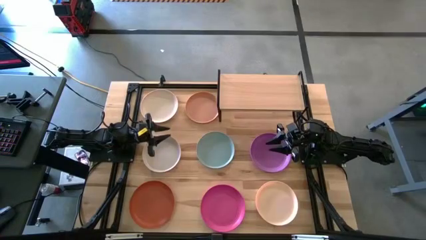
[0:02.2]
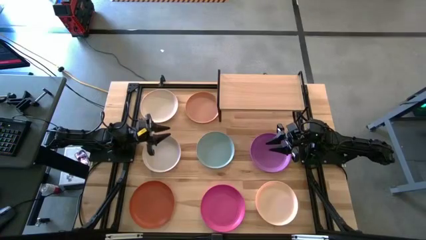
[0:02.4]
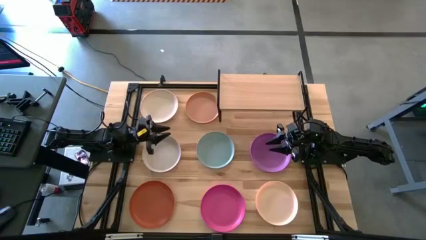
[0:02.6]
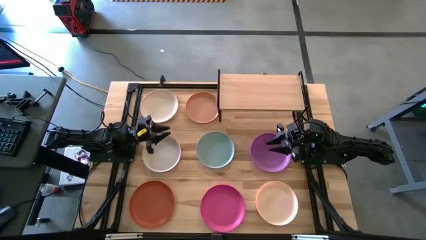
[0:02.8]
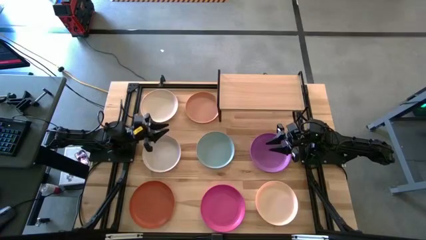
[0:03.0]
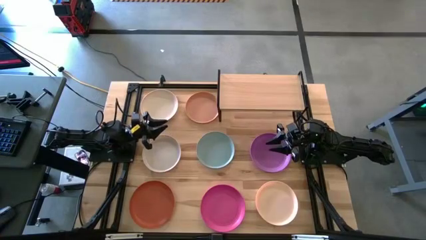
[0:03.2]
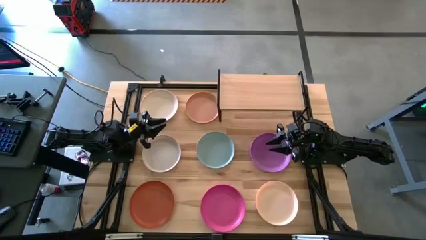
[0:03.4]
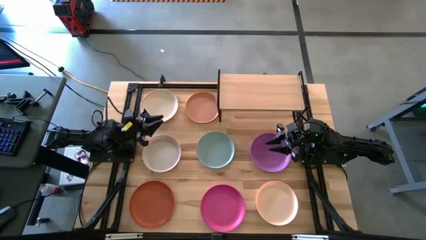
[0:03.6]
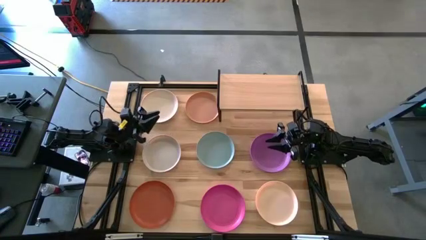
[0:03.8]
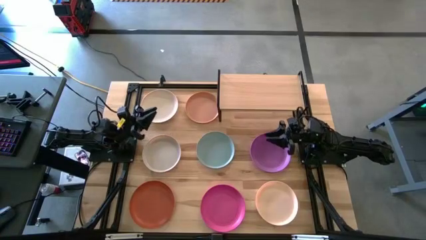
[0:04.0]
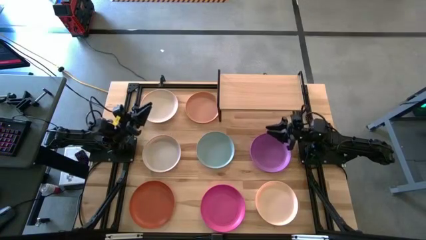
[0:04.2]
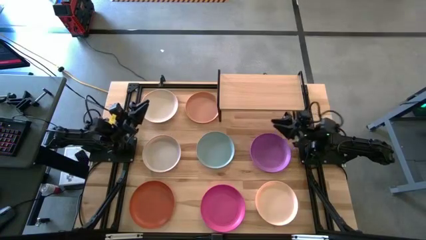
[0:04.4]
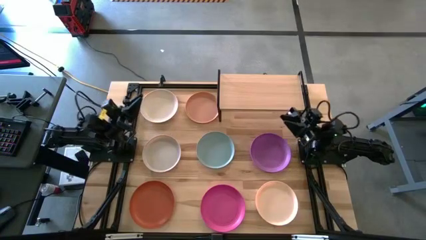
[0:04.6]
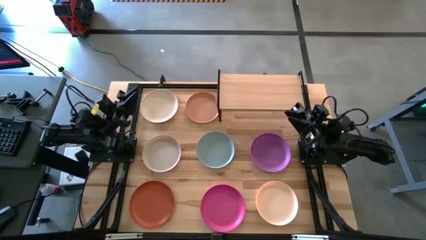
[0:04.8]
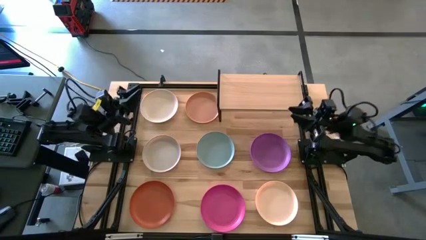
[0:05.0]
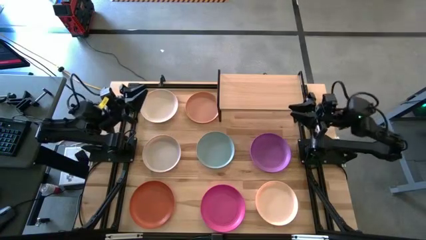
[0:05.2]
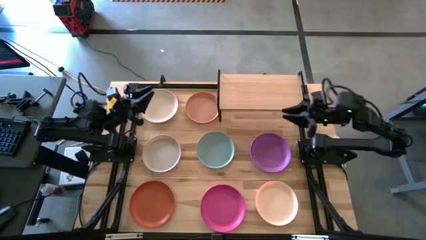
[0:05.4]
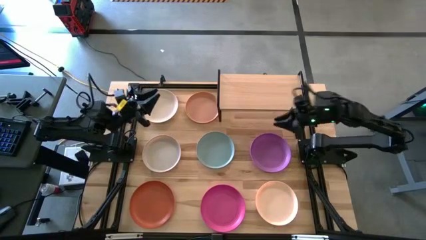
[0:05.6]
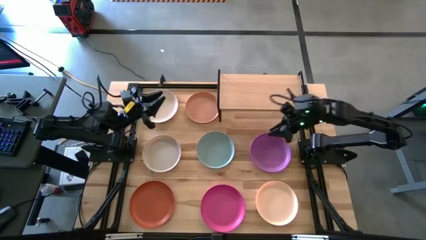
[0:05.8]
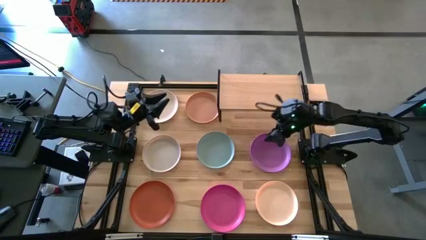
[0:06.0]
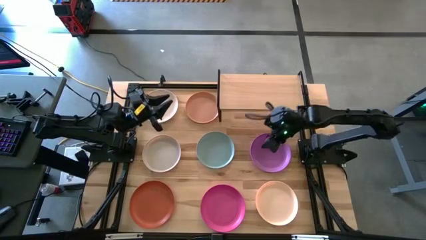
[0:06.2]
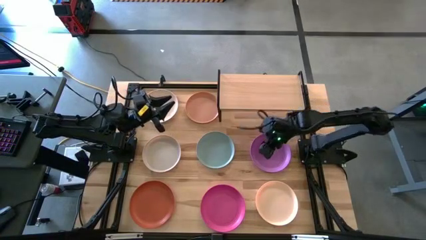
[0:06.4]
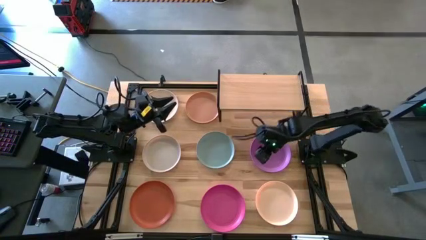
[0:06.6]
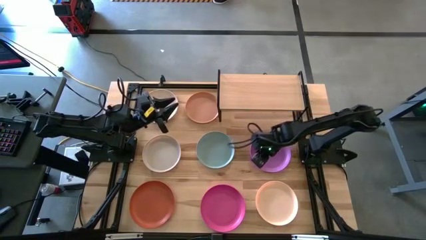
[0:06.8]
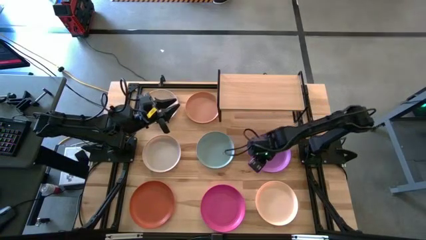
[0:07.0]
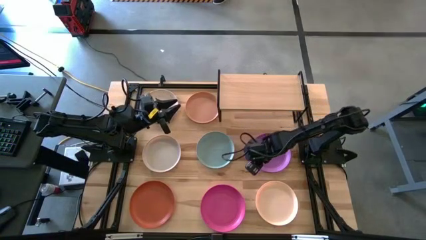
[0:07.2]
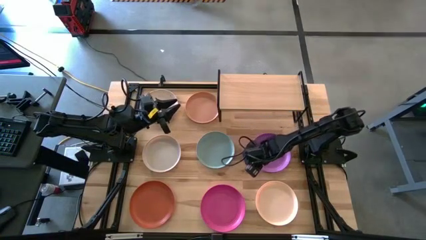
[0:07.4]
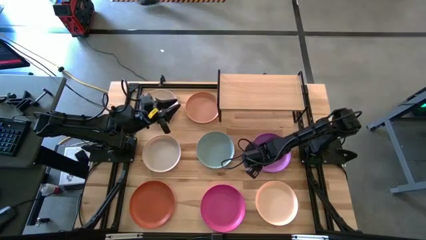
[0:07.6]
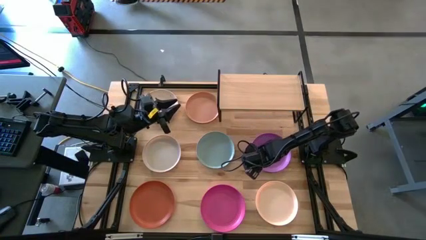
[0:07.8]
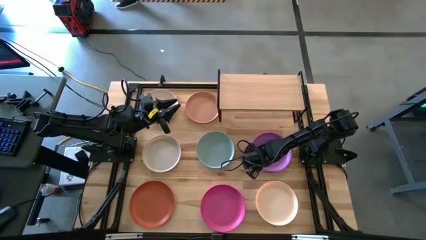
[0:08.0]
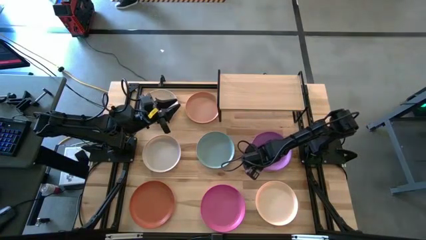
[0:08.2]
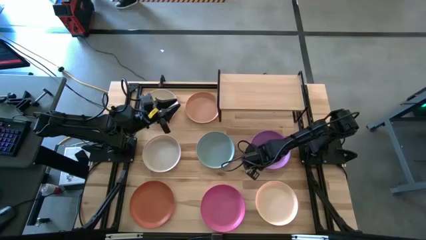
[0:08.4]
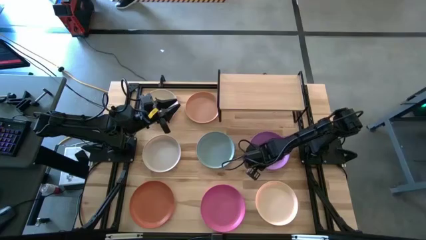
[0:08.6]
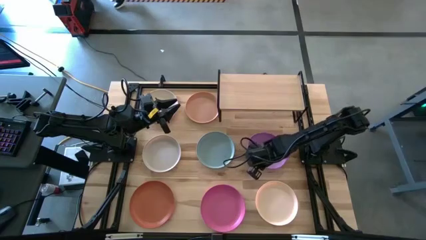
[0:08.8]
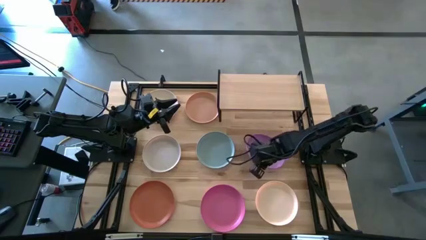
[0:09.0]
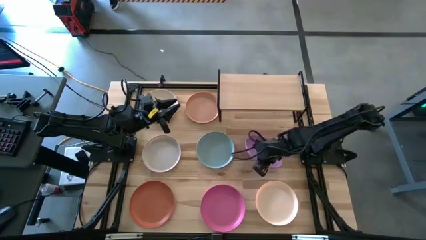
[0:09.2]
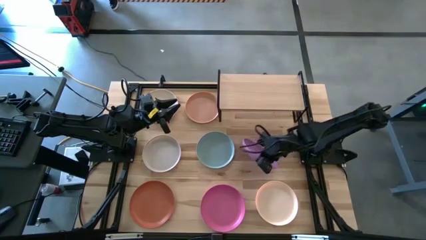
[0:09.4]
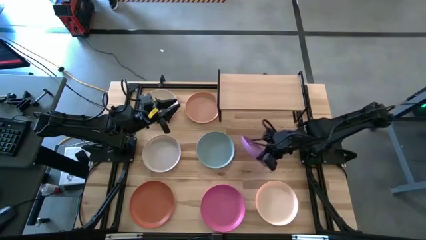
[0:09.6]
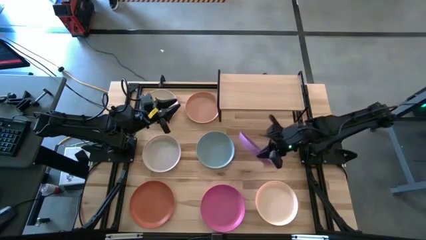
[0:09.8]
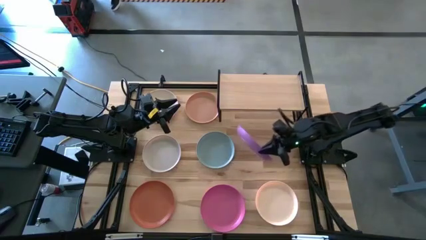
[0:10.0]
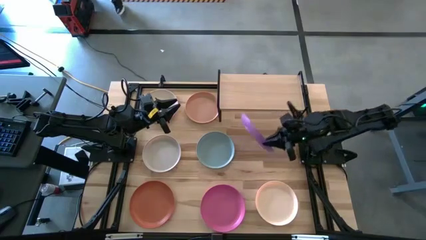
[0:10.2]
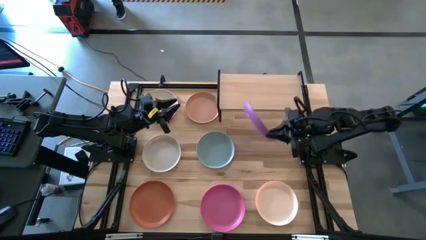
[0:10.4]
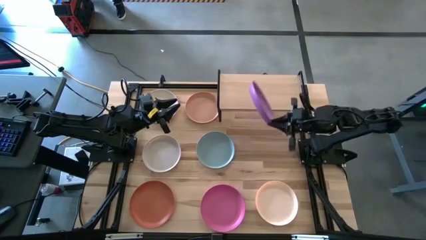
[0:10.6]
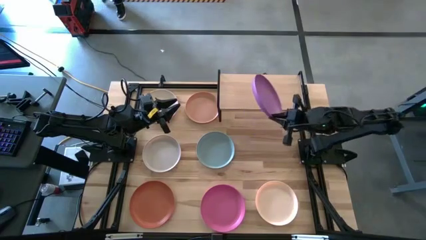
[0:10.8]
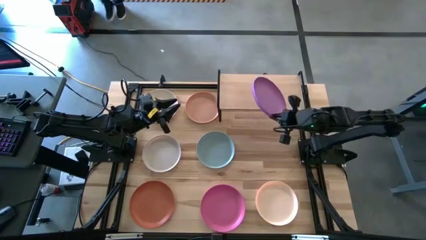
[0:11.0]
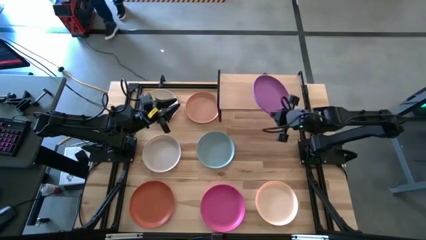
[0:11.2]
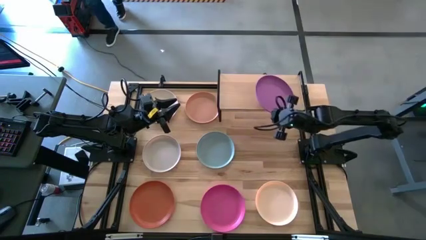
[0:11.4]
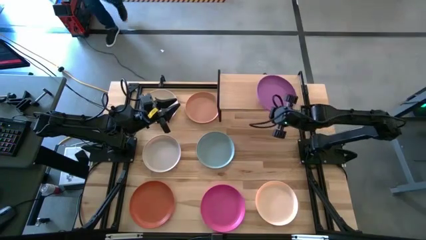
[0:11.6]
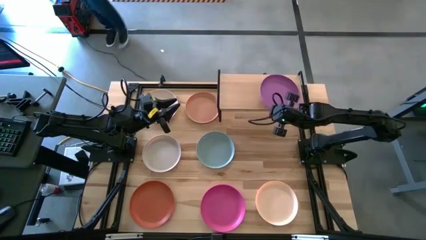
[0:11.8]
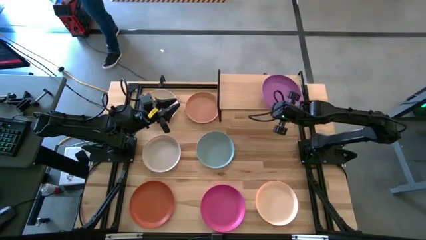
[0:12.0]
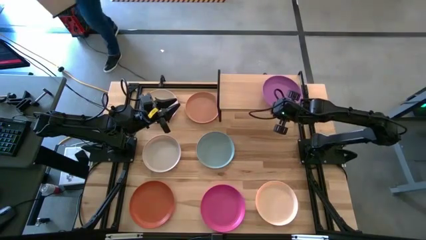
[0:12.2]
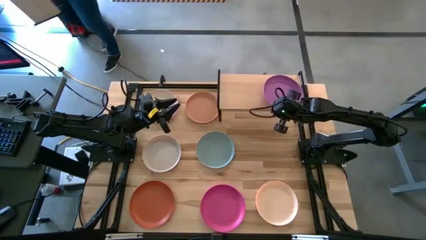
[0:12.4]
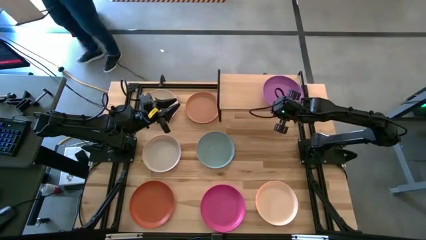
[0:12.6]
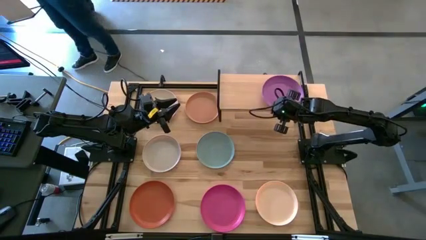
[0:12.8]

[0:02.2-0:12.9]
Task: Place and stack plates onto a shelf
Put the purple plate on the shelf
